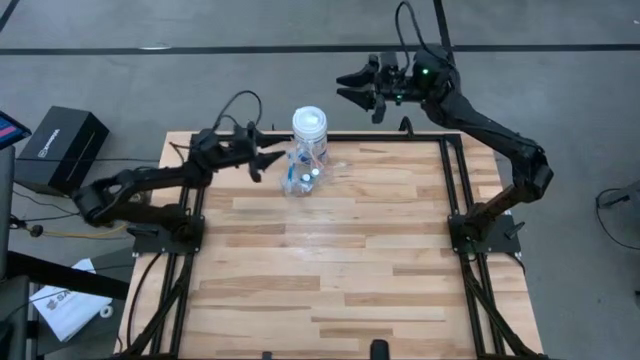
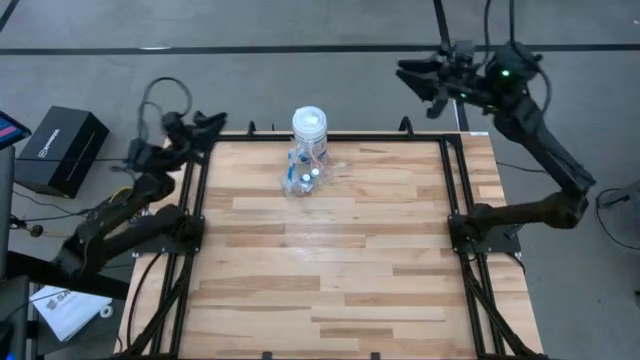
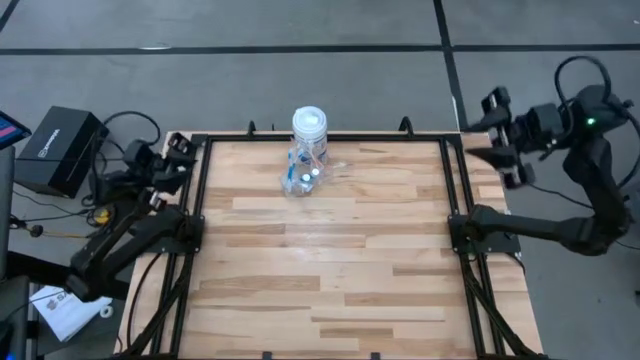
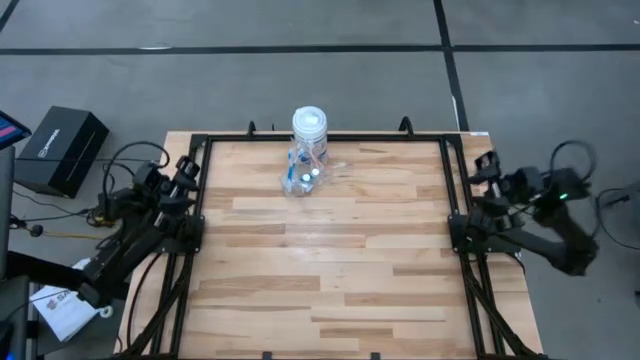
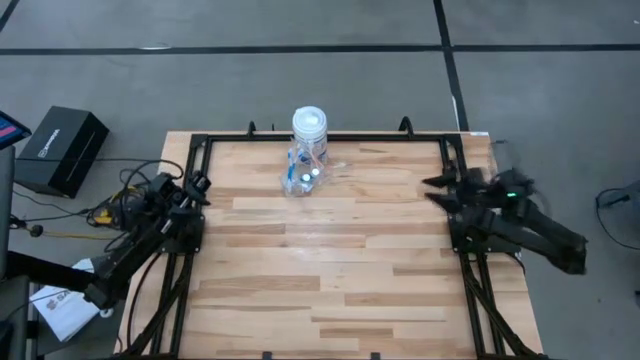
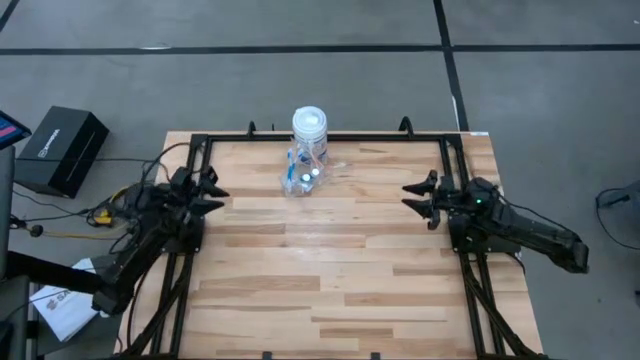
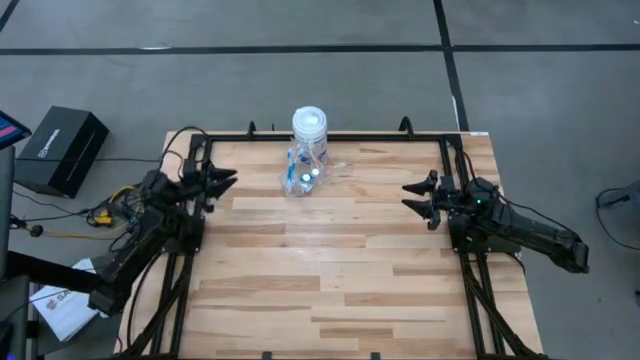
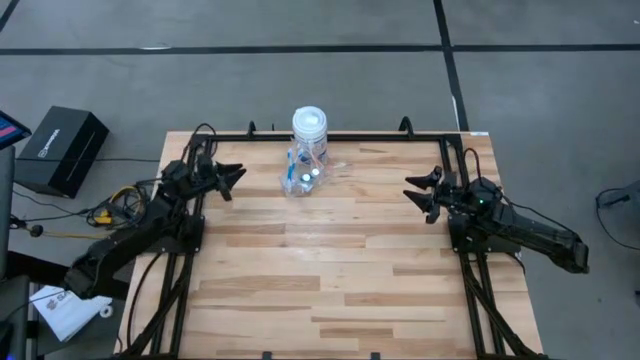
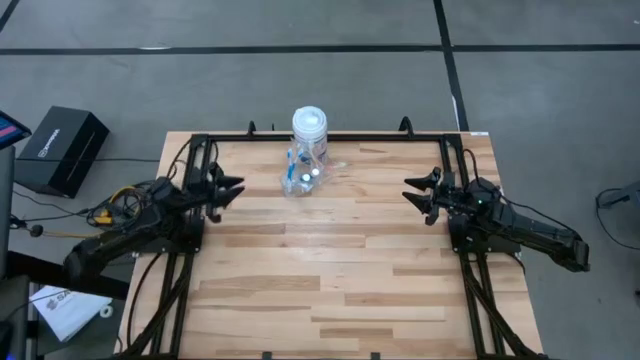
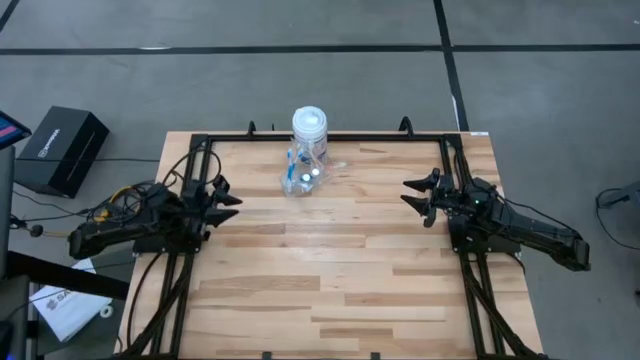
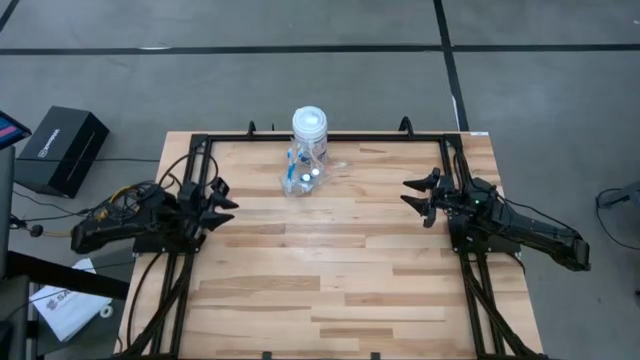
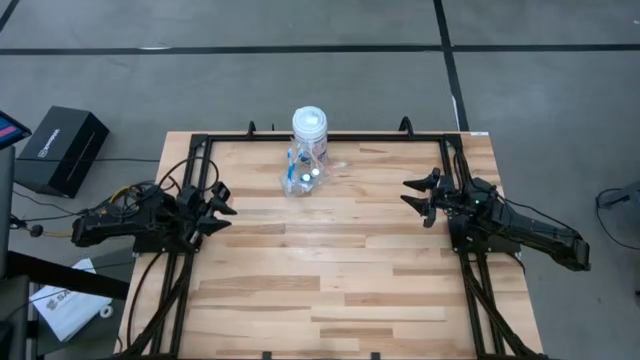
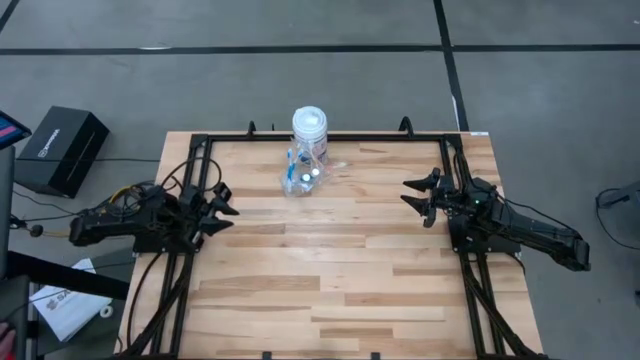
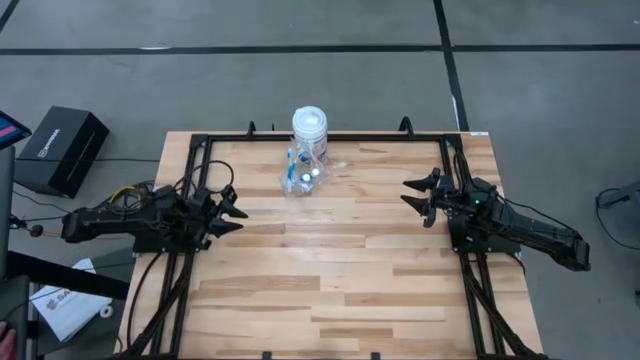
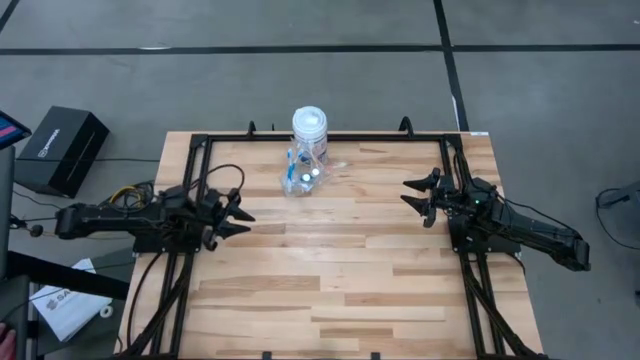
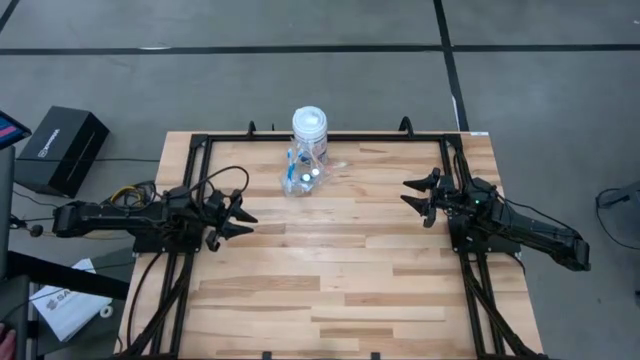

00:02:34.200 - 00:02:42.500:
Task: Pick & Place toothbrushing station
Return to Home Position

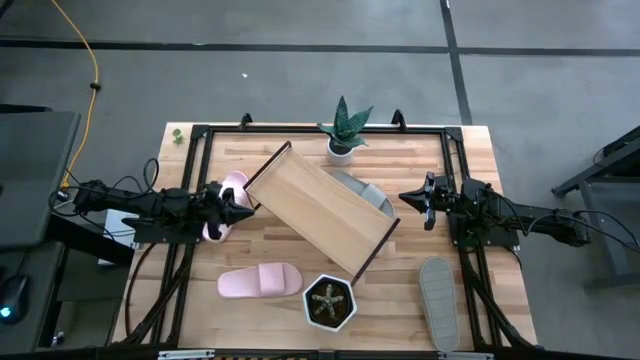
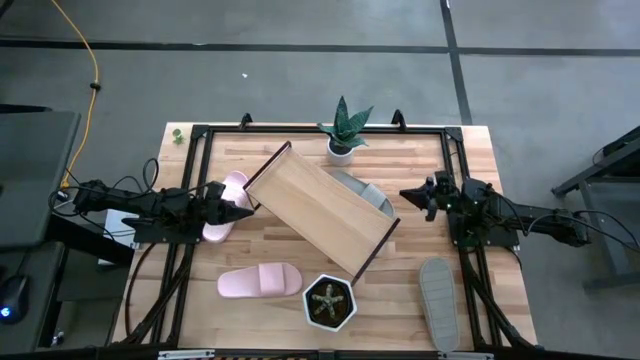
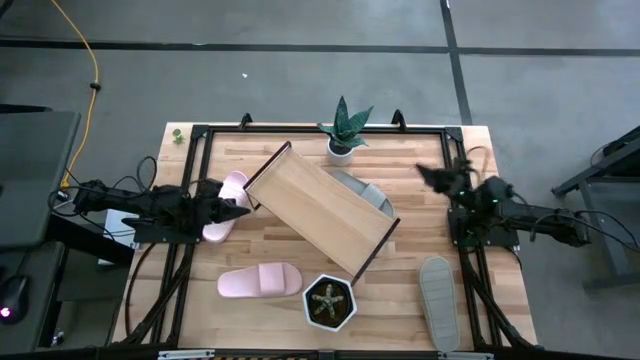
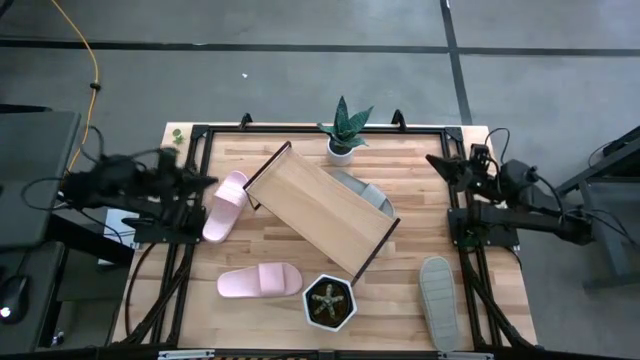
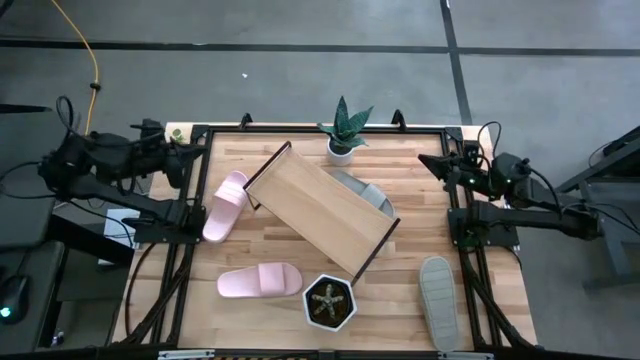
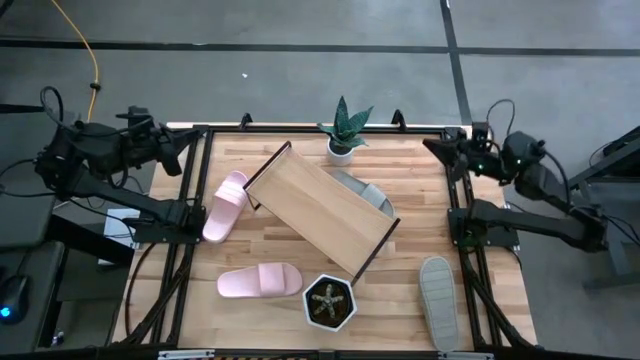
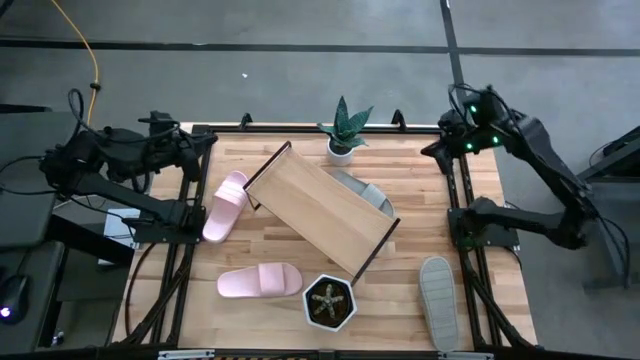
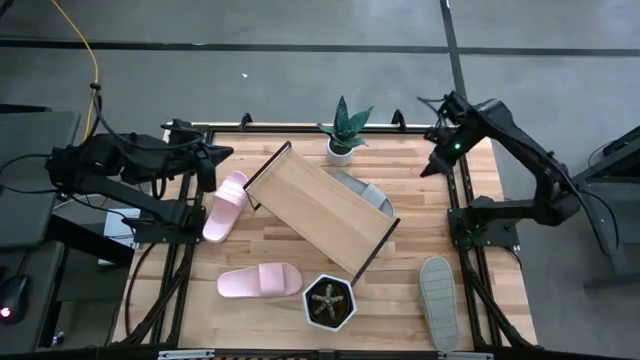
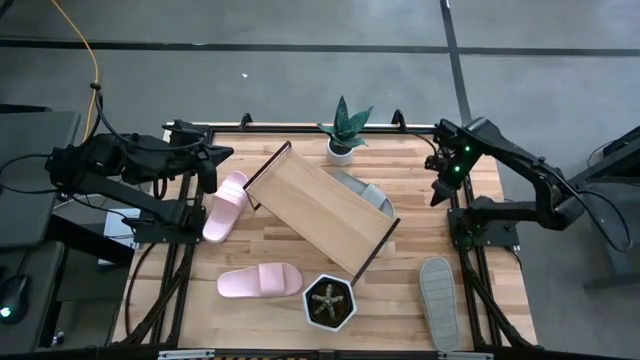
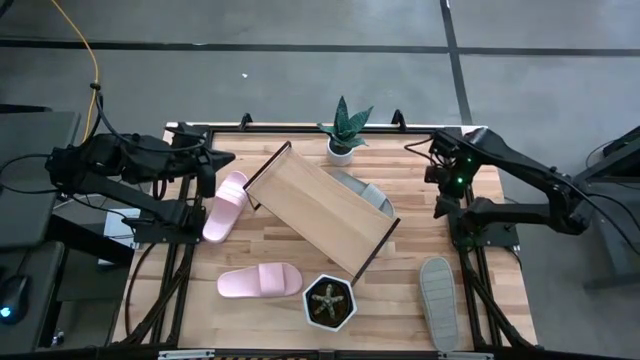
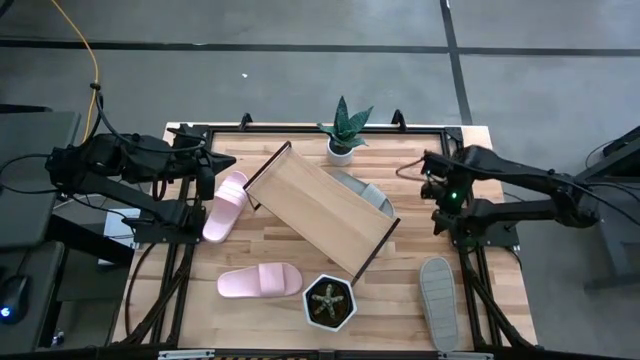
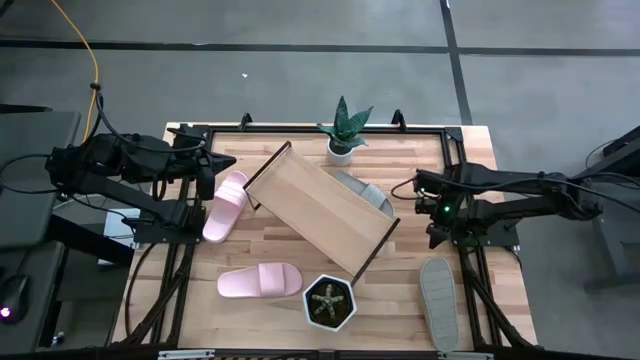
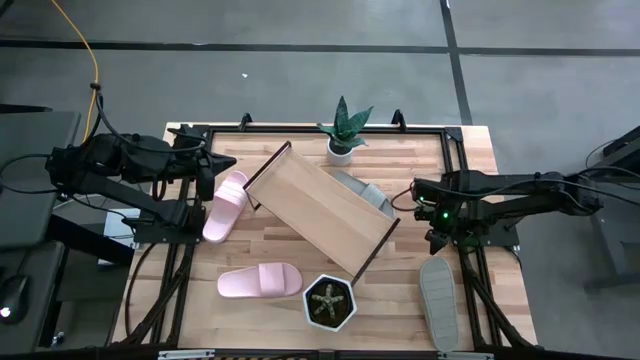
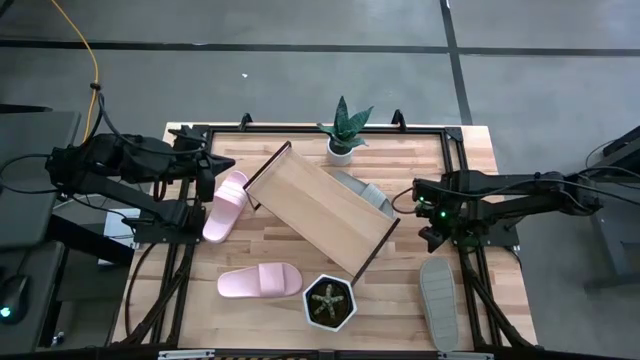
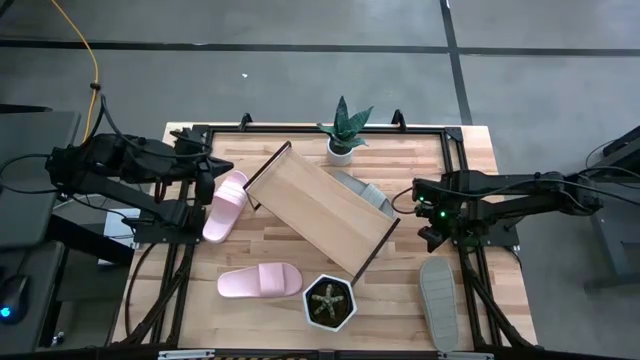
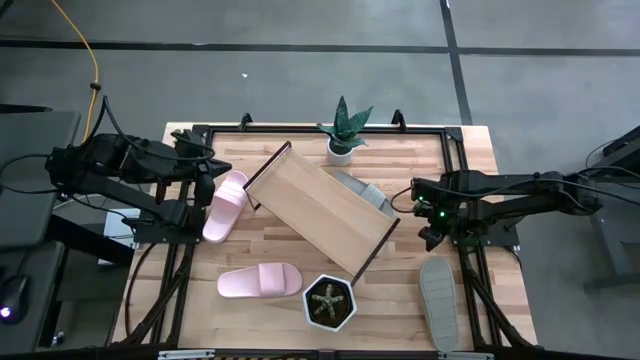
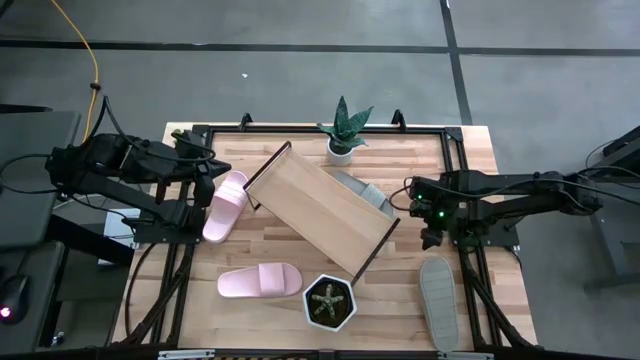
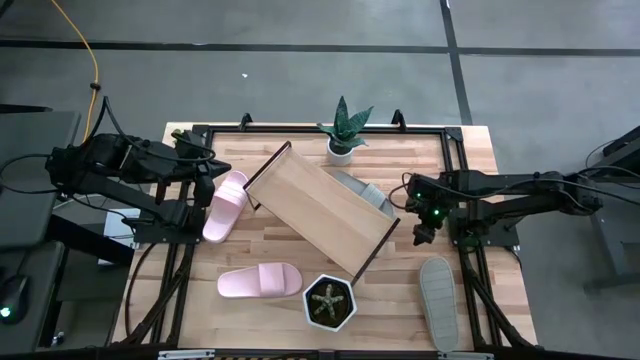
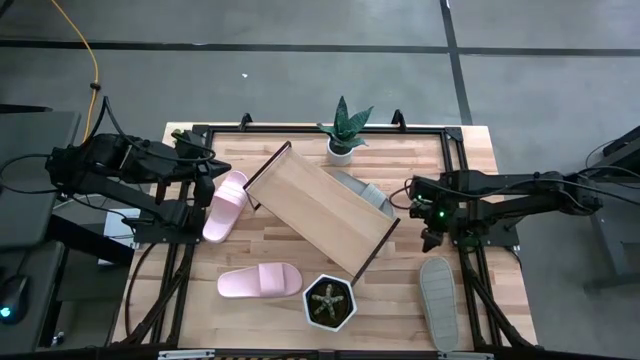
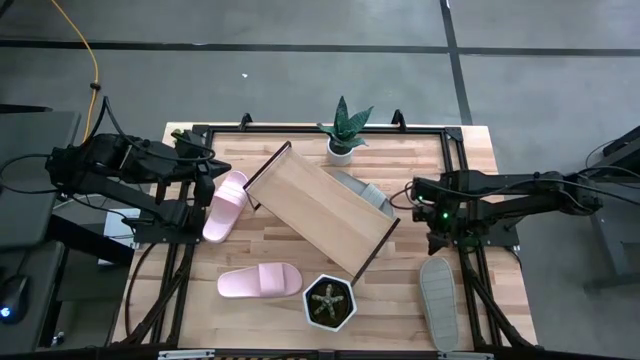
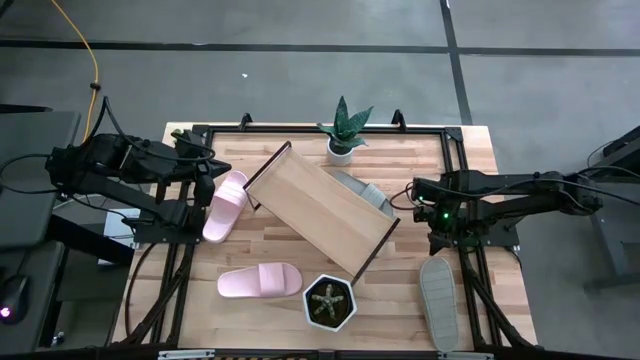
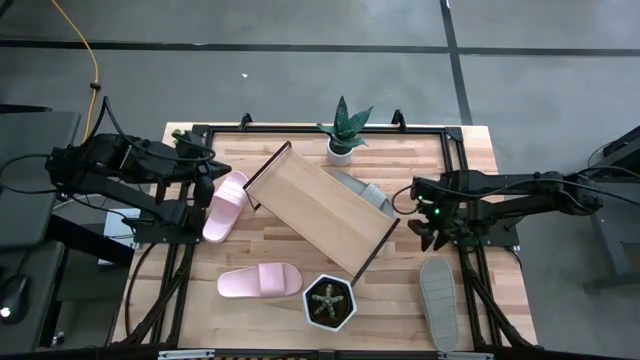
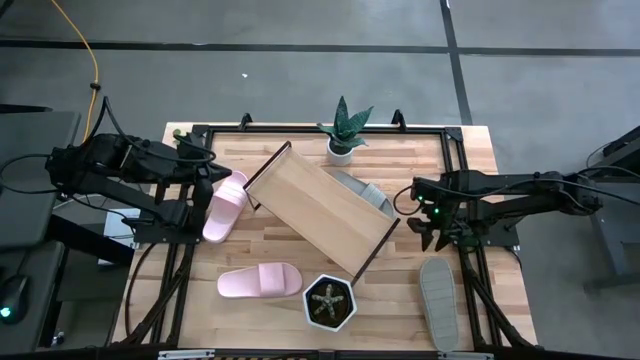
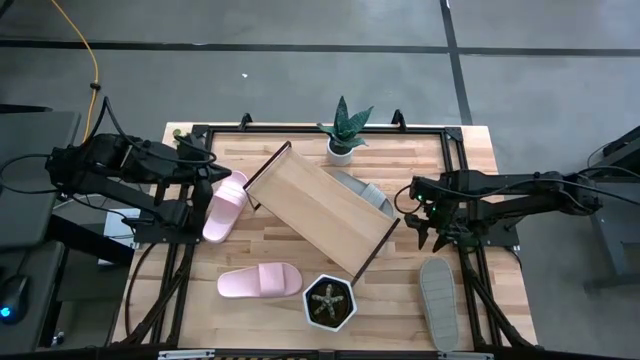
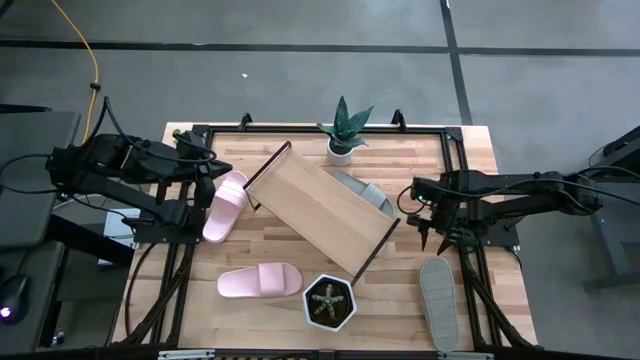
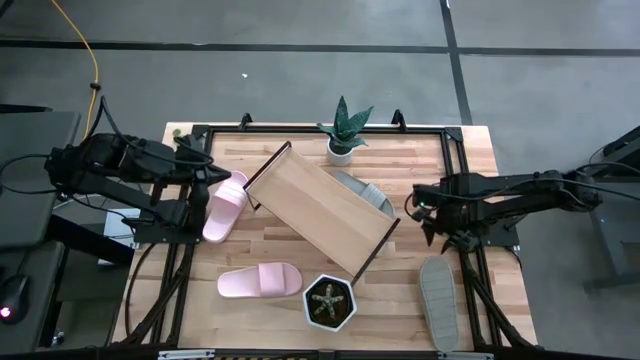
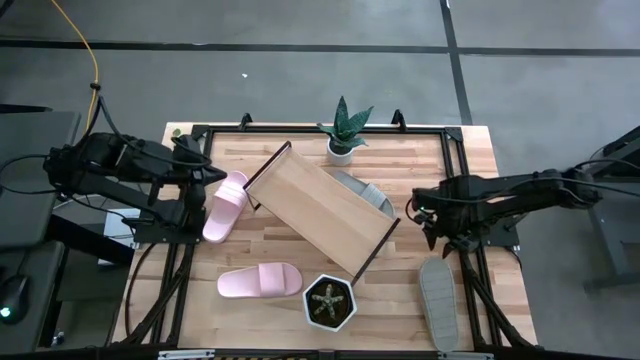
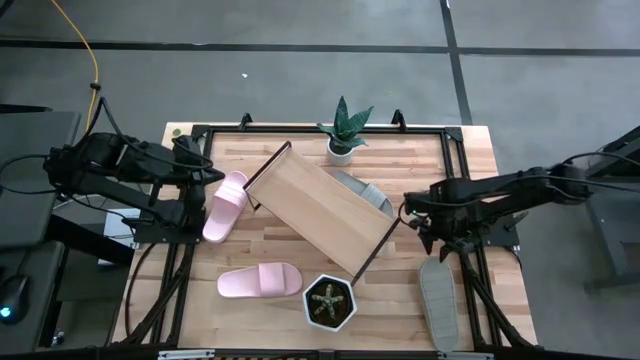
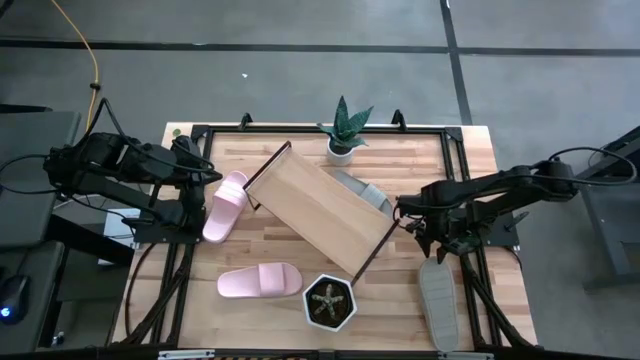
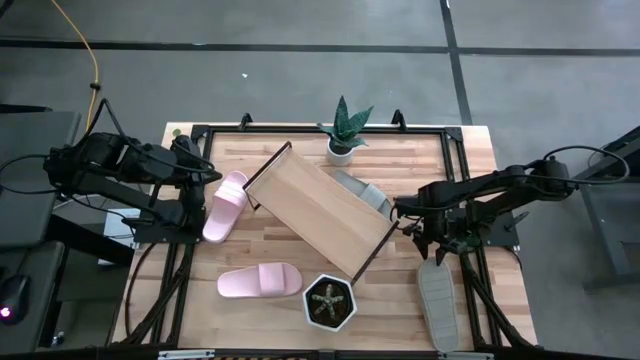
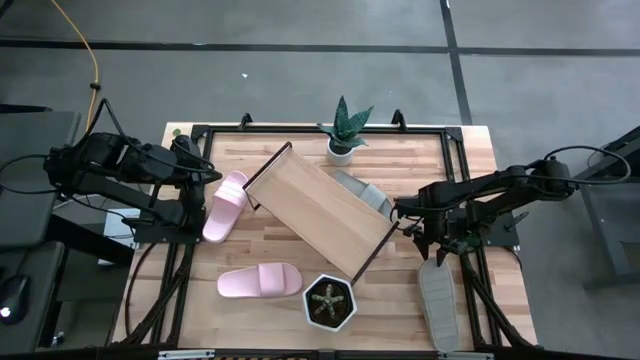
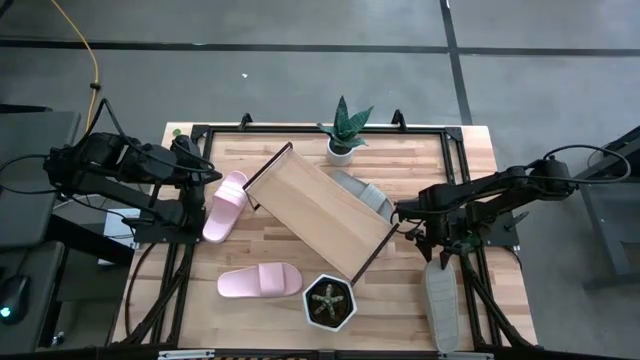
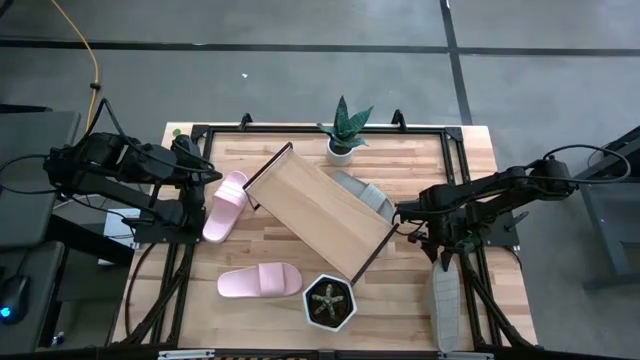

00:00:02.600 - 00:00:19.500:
Task: Pick and place slides into the shelf
Put the bottom gray slipper on the shelf
